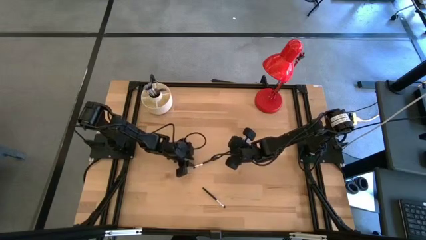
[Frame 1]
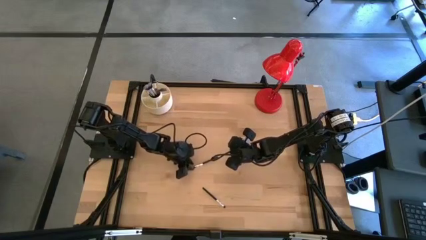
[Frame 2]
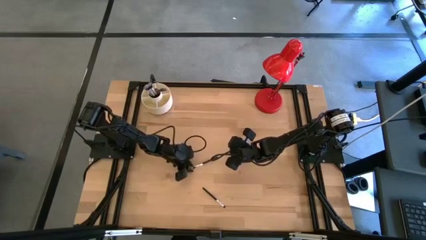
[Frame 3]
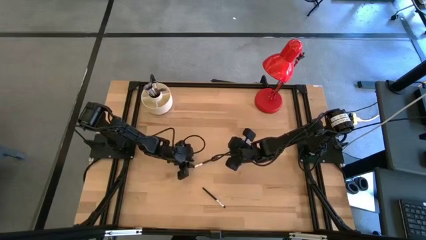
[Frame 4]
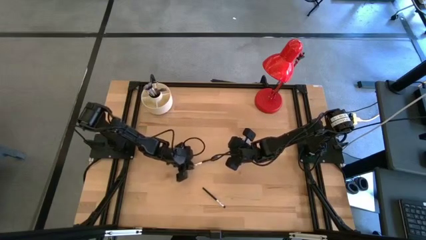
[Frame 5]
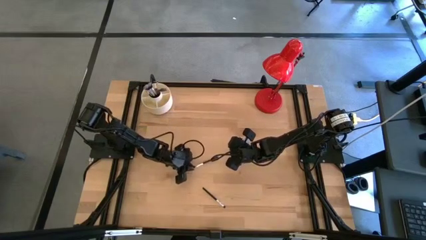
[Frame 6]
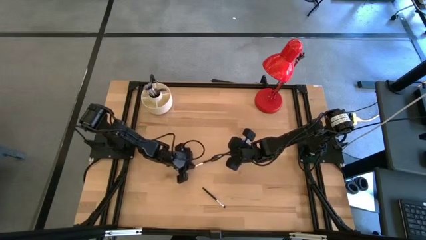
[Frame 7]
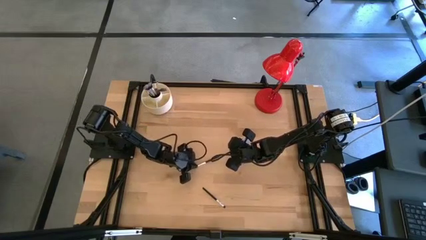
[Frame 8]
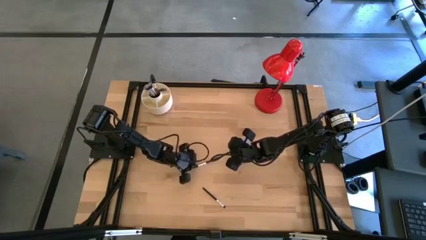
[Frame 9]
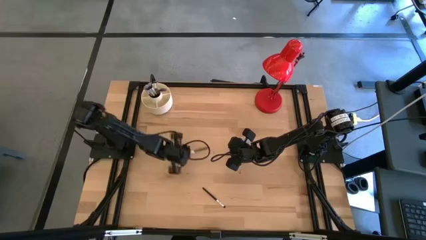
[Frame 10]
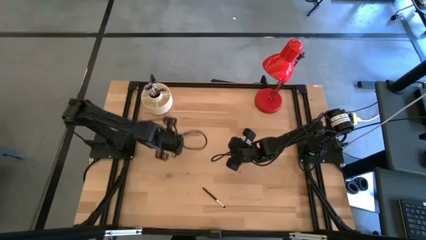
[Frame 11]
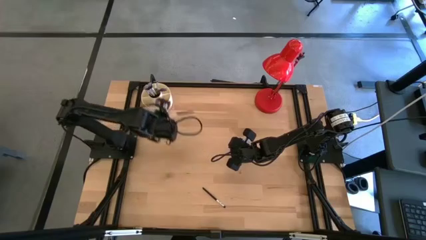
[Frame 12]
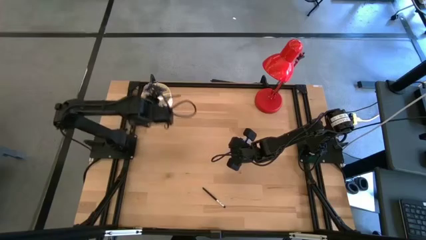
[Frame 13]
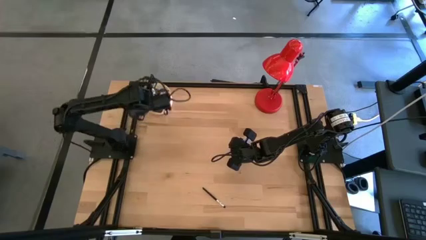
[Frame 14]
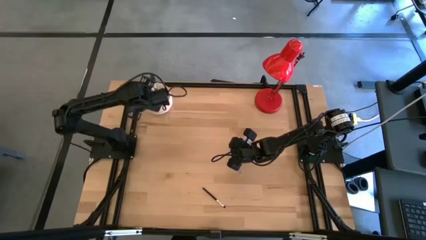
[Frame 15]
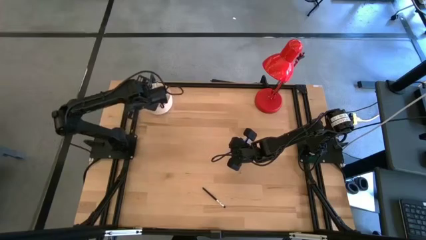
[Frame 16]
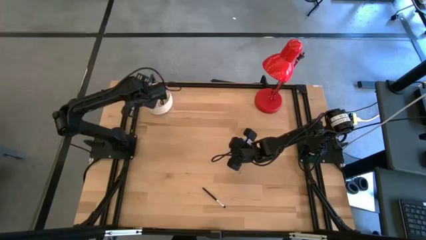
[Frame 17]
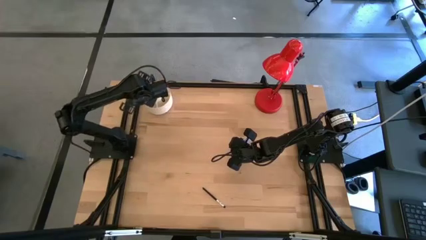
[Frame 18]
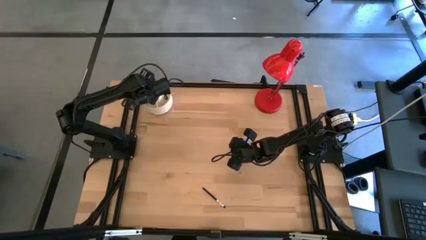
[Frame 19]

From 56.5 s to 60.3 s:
Task: Put items in baskets/containers
Put the eyeshadow brush into the white pen holder

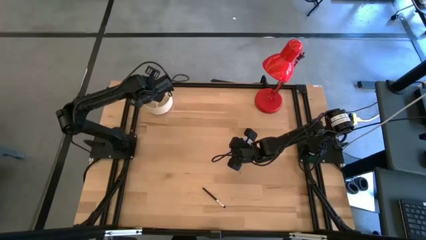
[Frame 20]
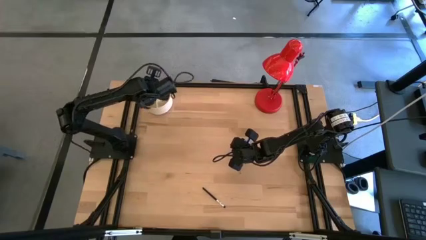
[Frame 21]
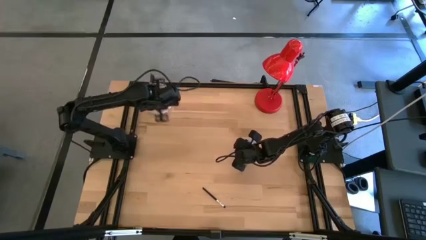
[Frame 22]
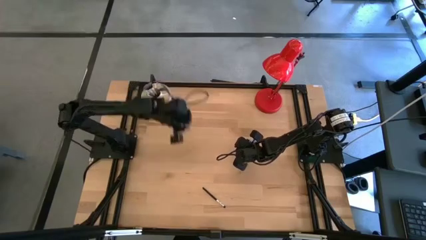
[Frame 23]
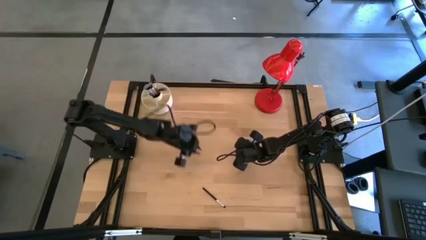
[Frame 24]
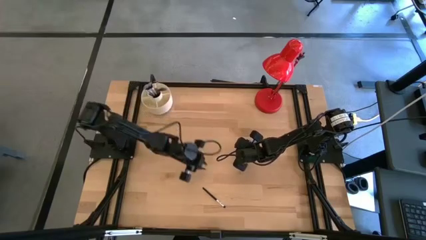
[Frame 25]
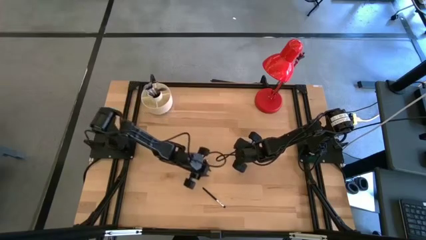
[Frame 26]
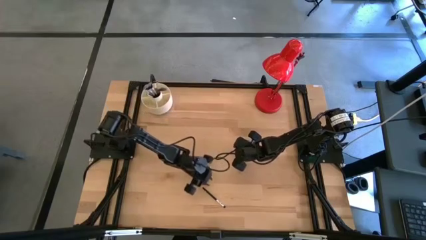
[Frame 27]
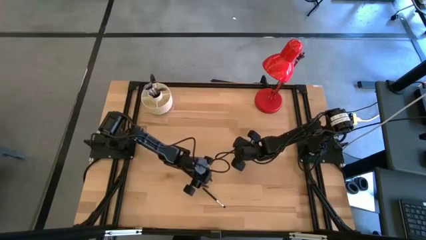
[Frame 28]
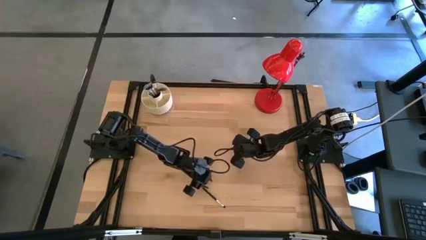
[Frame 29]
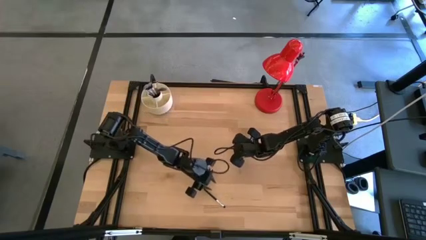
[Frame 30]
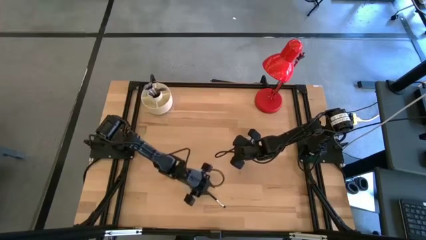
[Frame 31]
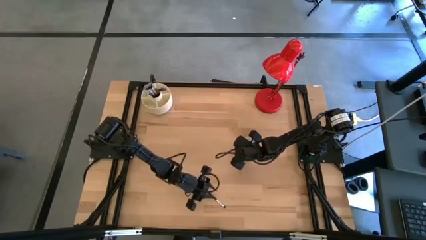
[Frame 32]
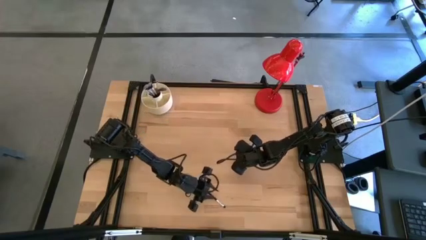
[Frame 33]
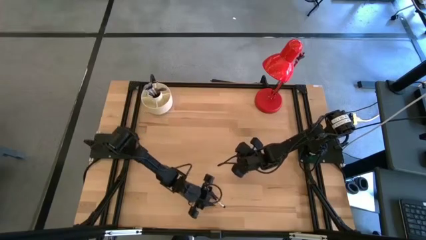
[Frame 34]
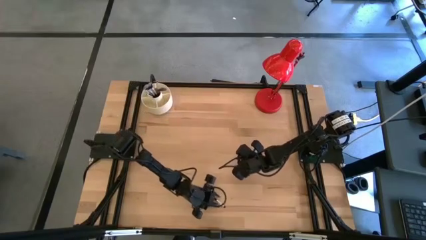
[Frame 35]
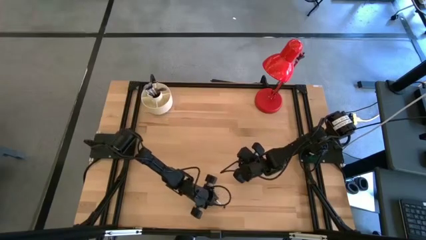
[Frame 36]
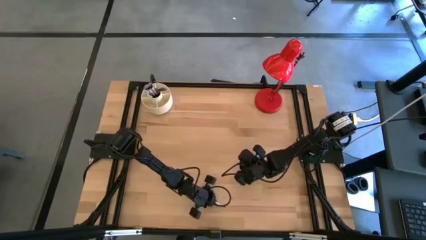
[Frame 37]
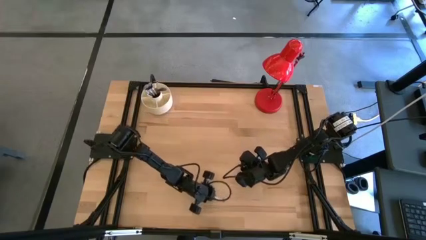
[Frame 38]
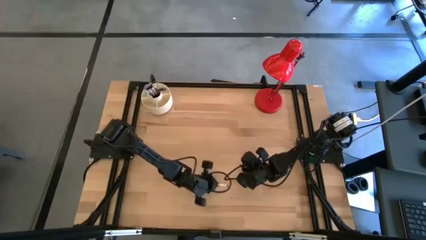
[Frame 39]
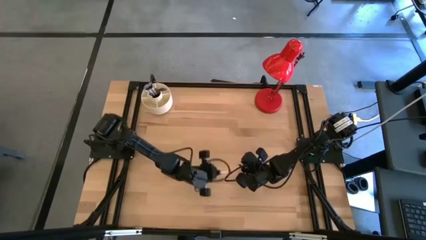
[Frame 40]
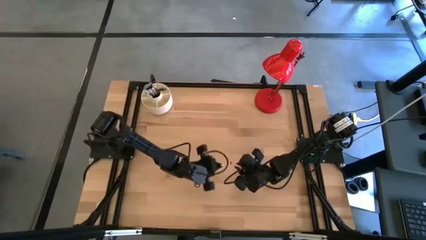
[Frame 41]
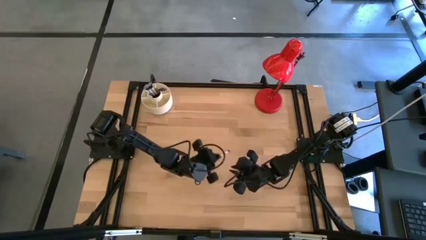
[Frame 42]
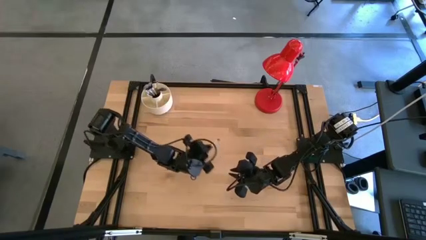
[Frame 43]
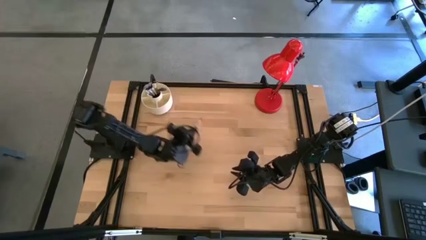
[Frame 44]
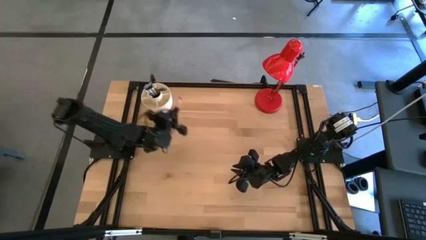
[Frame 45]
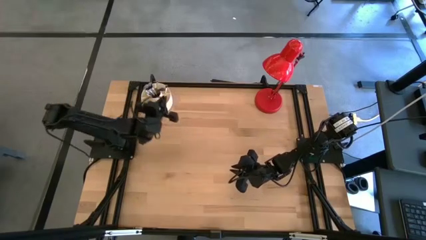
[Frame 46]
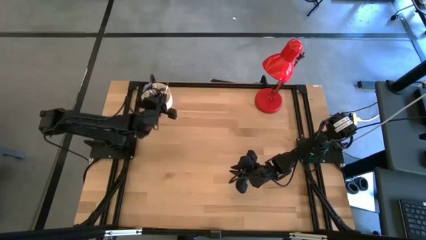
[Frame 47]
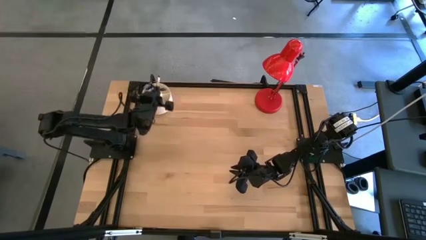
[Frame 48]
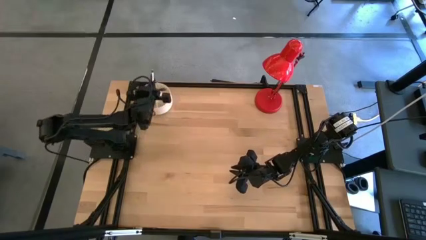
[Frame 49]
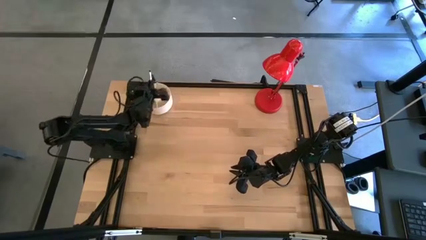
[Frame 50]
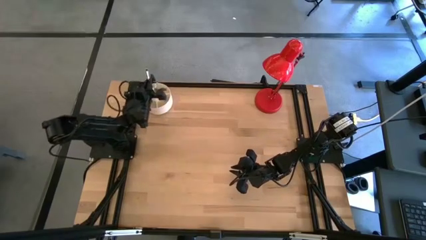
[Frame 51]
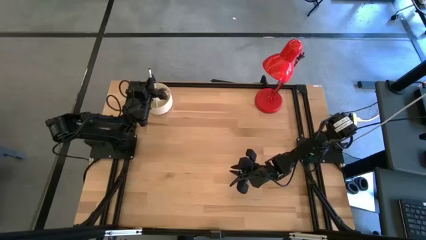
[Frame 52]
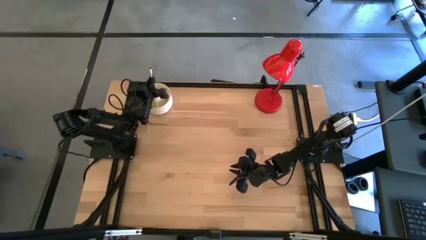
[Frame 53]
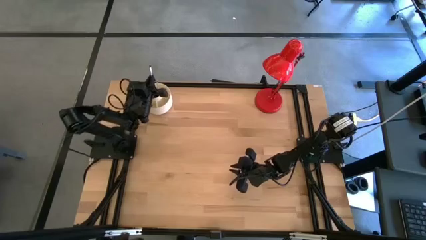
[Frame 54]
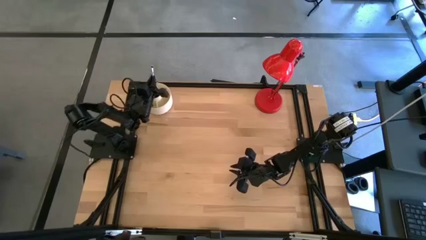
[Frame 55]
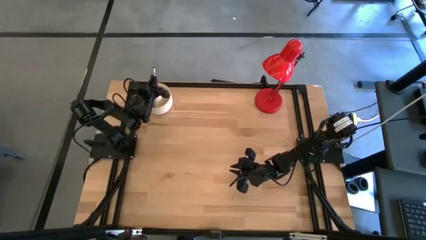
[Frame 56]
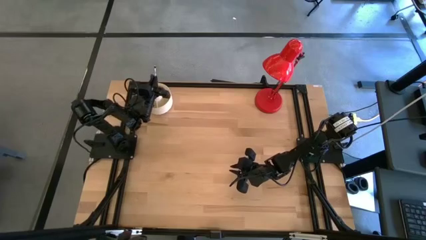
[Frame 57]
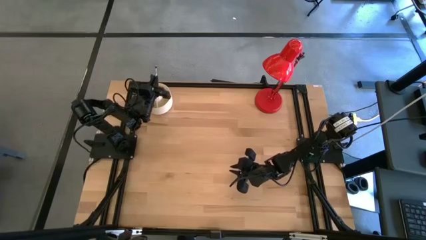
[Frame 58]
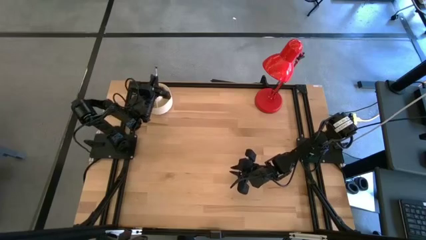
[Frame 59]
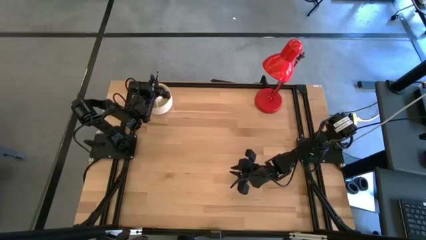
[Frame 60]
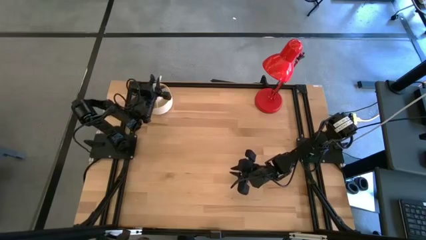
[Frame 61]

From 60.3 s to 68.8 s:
Put the eyeshadow brush into the white pen holder

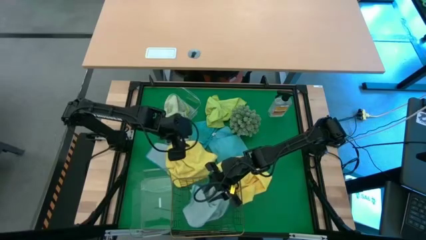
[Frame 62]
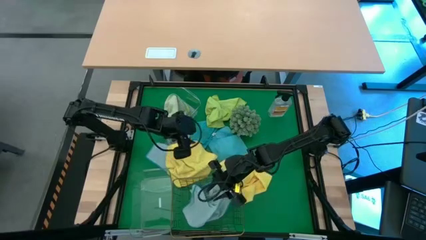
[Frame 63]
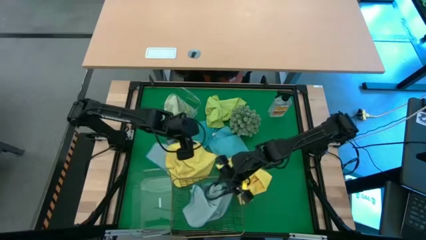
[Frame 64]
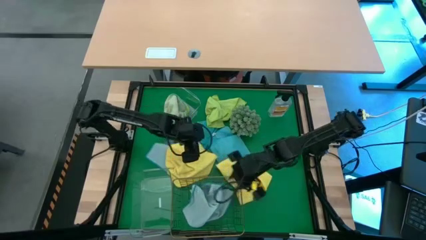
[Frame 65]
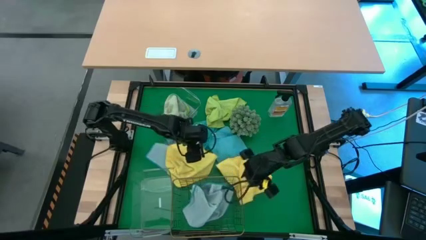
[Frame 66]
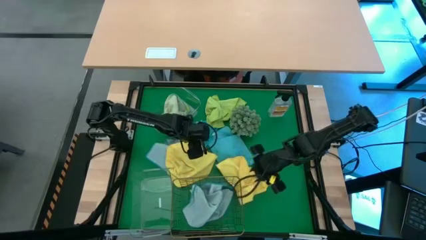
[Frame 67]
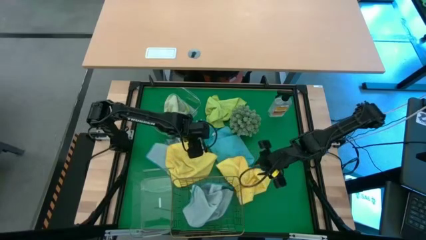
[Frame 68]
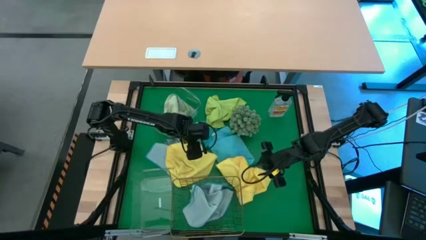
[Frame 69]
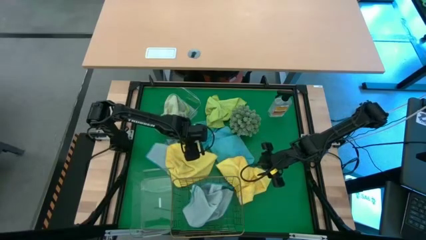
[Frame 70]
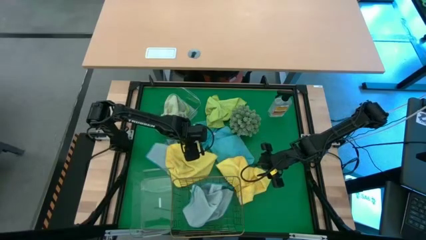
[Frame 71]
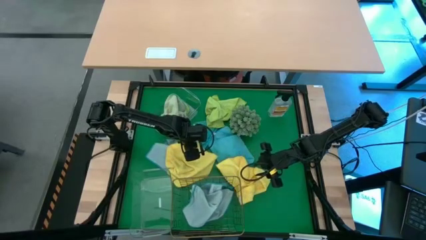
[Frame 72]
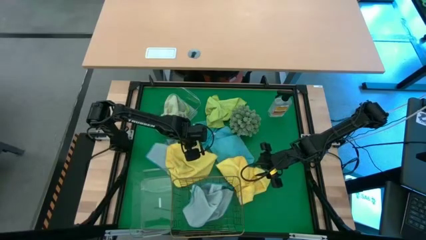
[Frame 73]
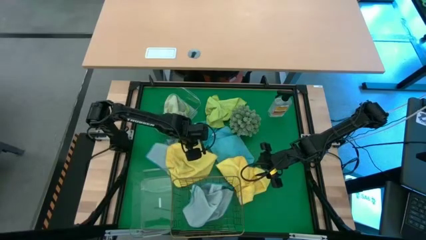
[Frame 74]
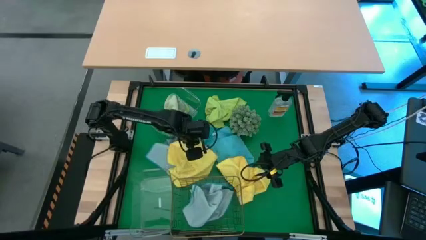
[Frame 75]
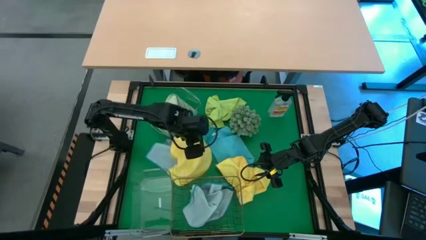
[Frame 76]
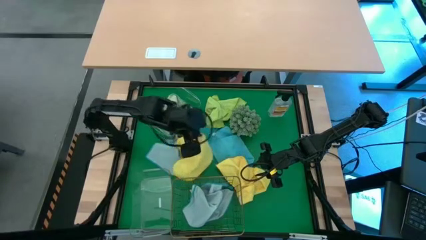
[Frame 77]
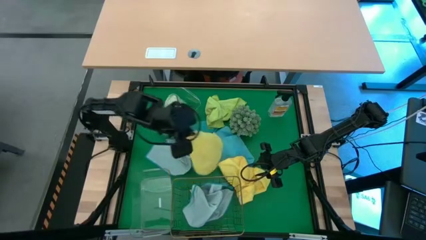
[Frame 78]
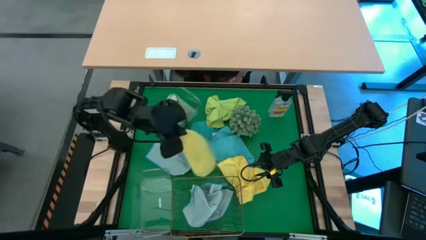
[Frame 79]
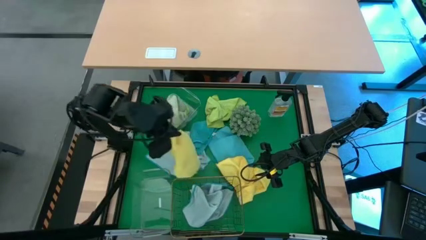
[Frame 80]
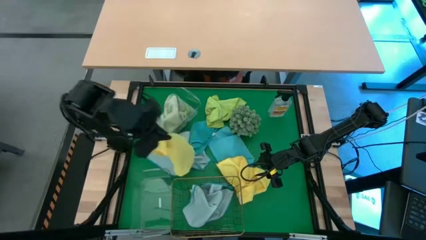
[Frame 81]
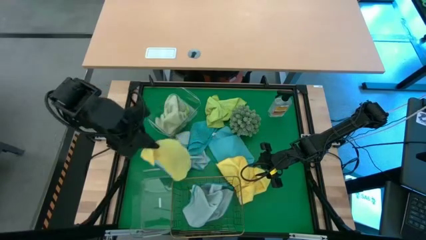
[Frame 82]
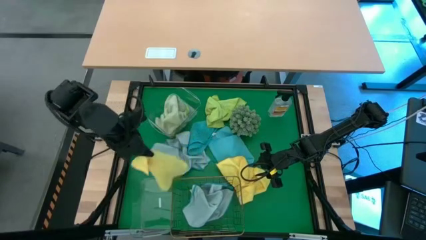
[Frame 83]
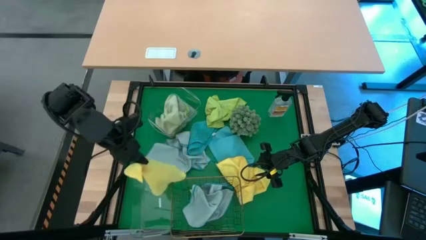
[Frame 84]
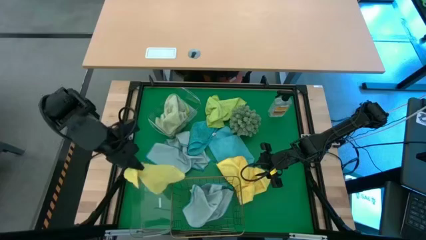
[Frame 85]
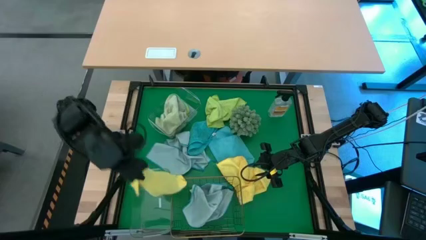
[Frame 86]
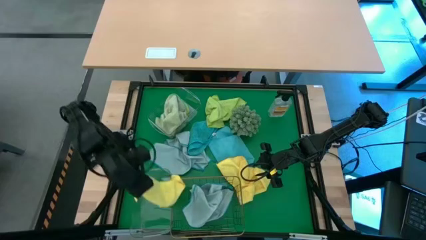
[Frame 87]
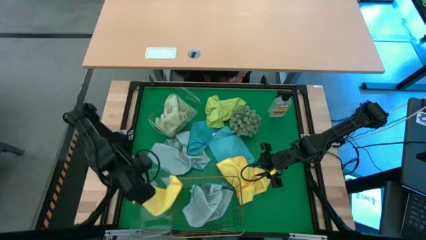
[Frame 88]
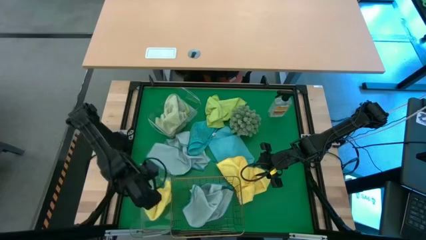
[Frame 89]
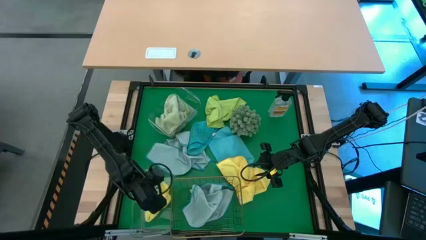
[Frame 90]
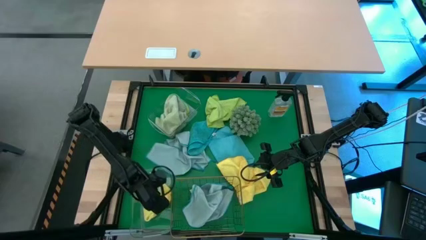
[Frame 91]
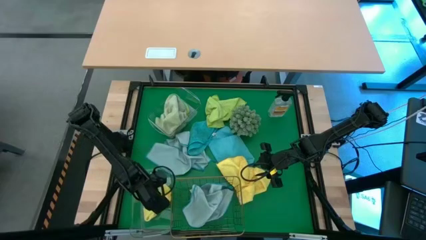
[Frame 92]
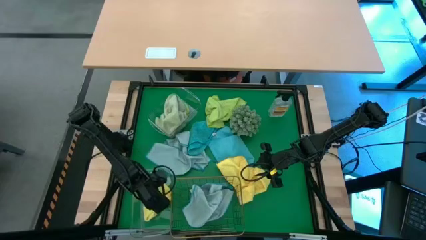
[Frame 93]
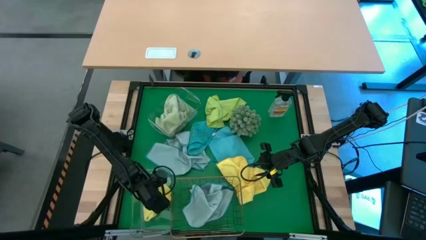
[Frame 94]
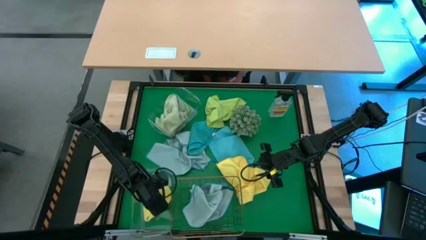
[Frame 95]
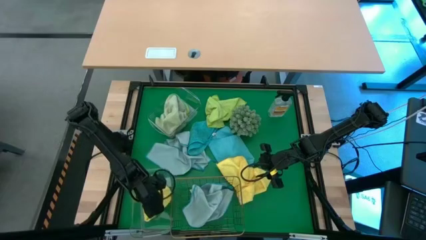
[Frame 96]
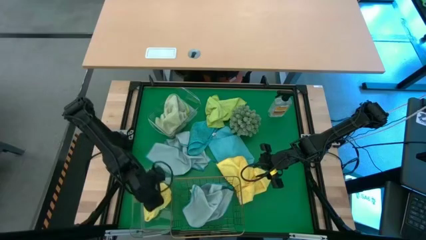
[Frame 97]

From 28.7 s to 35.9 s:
Task: Sort microfiber towel by color & place in baskets
Put the left yellow microfiber towel into the bottom transparent bin
